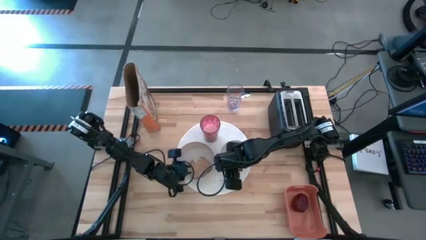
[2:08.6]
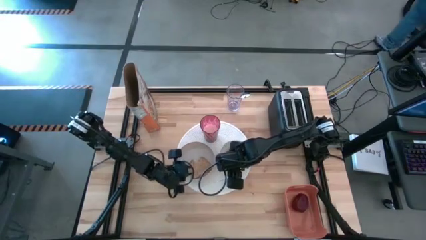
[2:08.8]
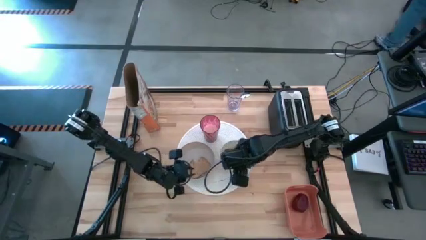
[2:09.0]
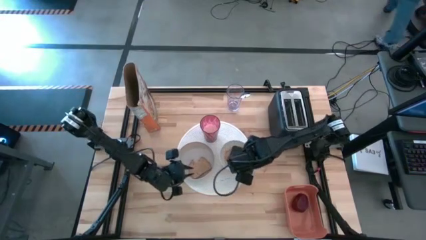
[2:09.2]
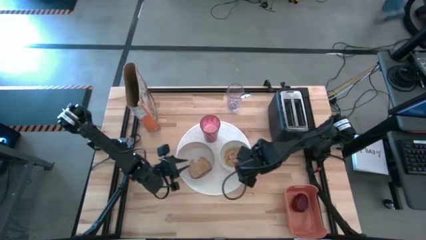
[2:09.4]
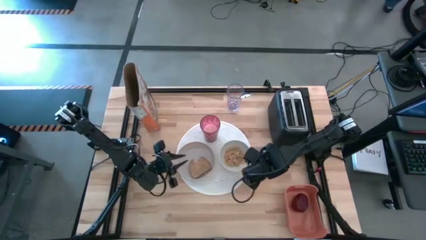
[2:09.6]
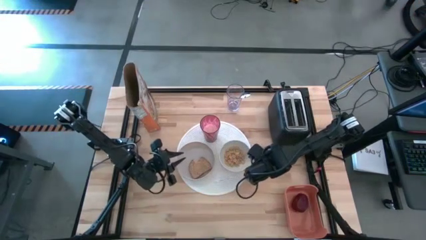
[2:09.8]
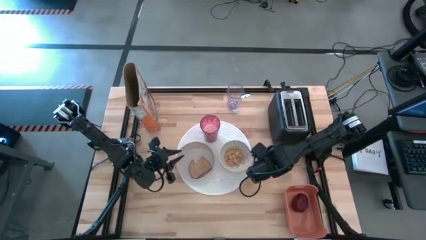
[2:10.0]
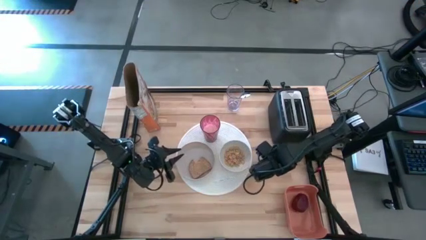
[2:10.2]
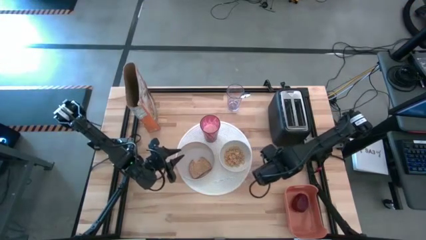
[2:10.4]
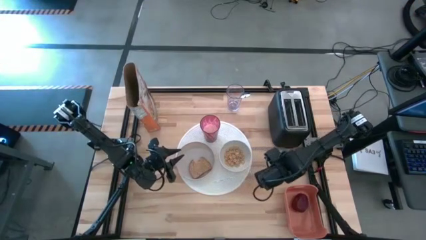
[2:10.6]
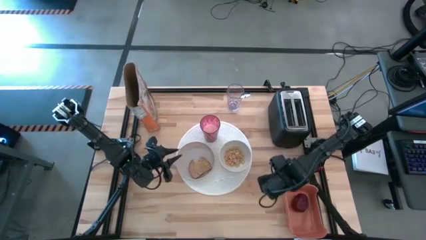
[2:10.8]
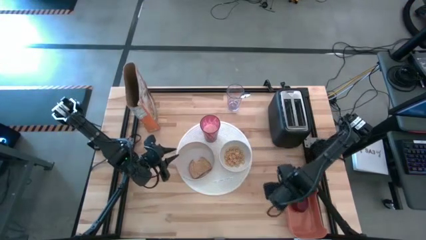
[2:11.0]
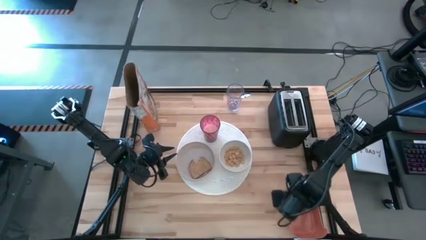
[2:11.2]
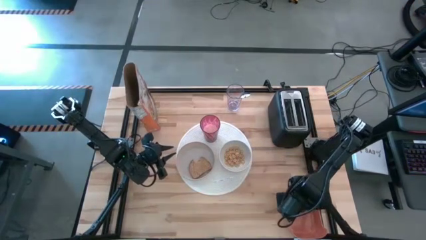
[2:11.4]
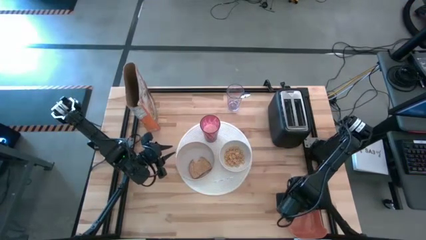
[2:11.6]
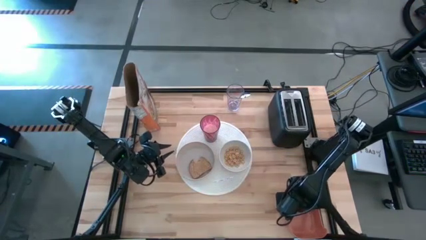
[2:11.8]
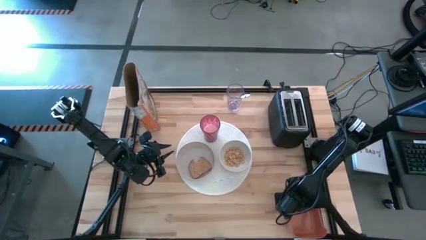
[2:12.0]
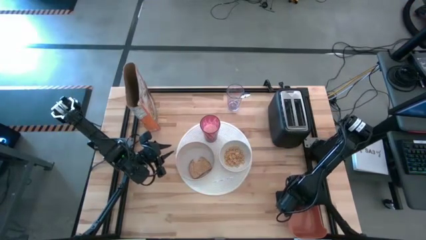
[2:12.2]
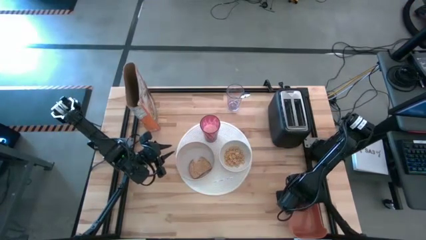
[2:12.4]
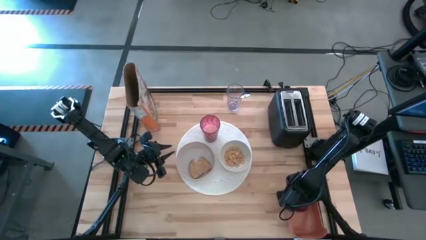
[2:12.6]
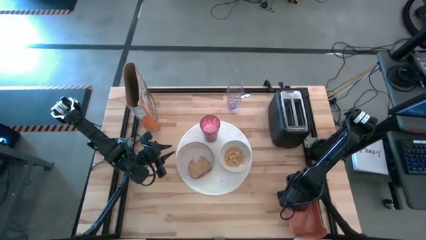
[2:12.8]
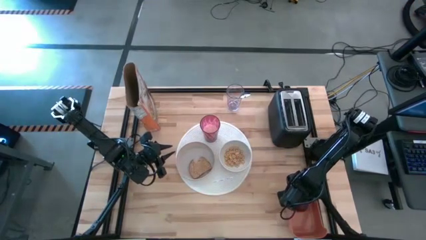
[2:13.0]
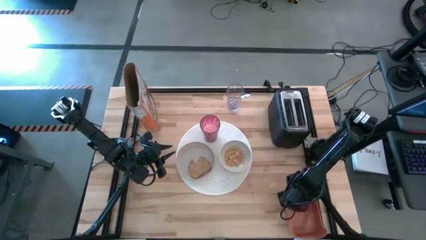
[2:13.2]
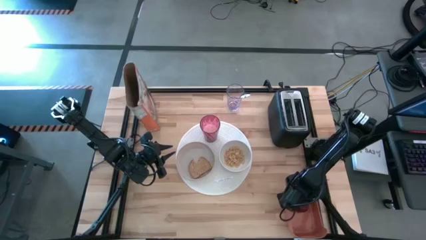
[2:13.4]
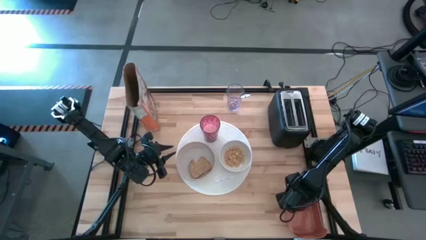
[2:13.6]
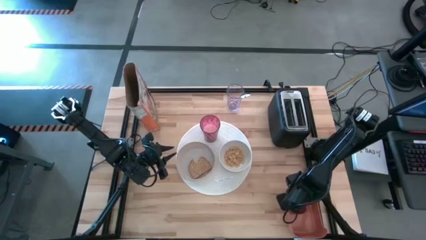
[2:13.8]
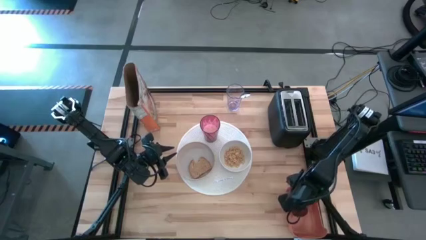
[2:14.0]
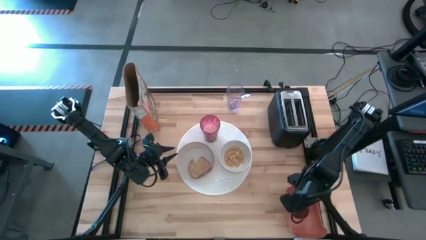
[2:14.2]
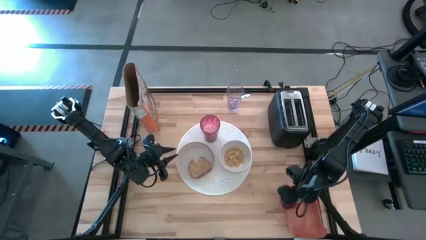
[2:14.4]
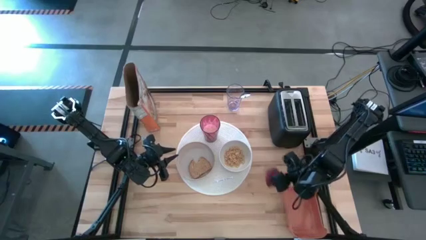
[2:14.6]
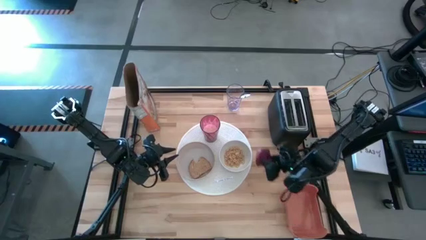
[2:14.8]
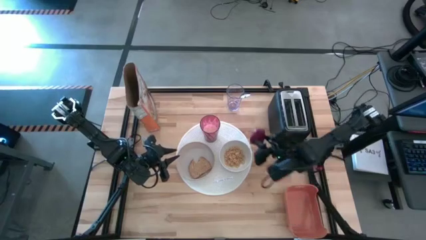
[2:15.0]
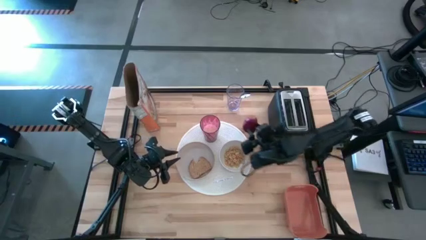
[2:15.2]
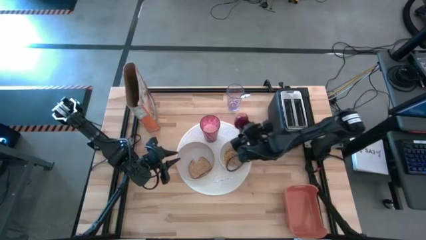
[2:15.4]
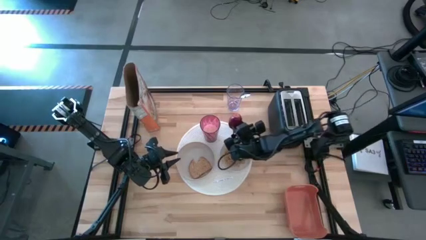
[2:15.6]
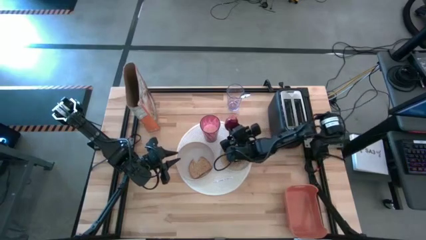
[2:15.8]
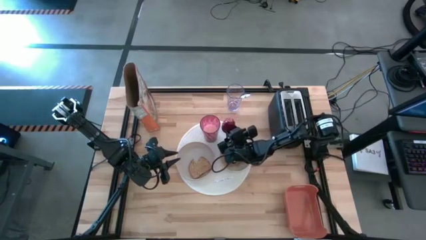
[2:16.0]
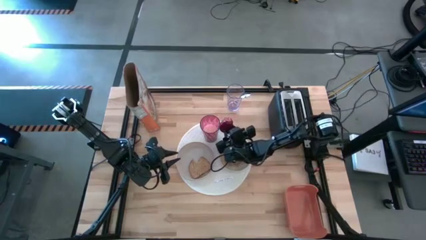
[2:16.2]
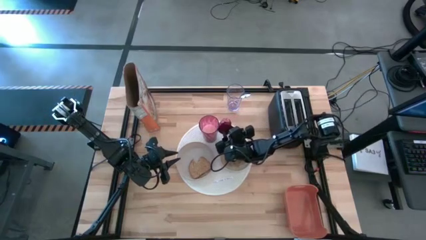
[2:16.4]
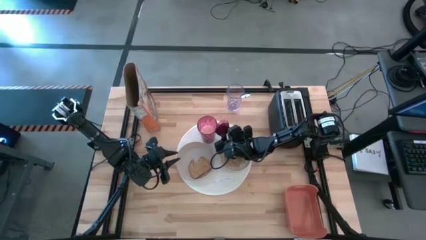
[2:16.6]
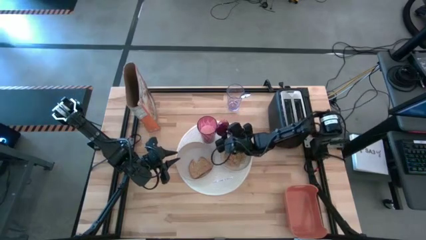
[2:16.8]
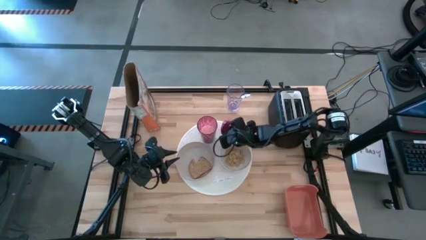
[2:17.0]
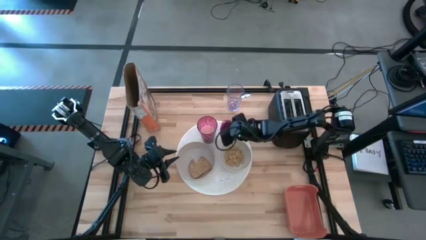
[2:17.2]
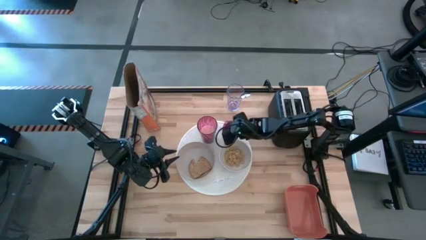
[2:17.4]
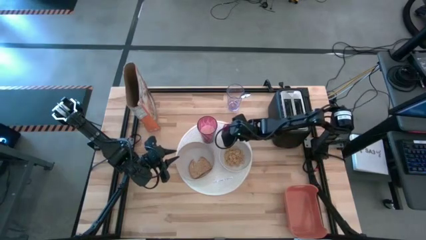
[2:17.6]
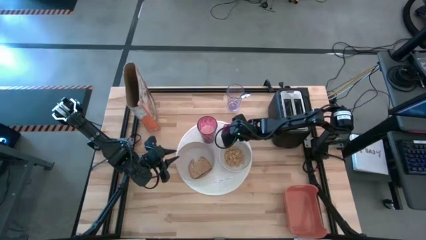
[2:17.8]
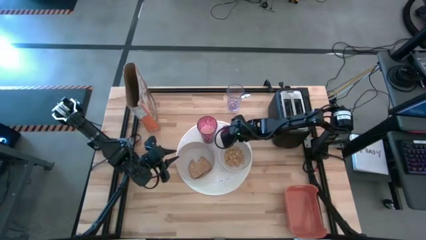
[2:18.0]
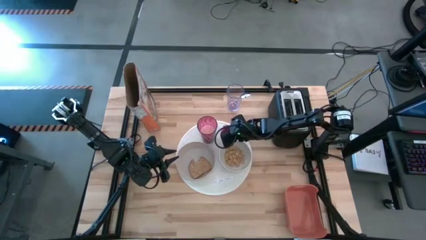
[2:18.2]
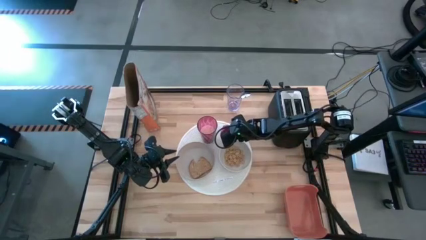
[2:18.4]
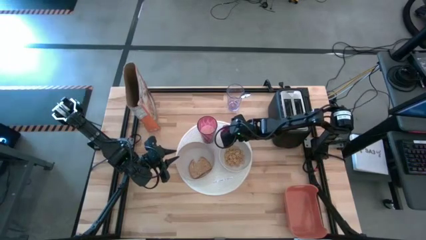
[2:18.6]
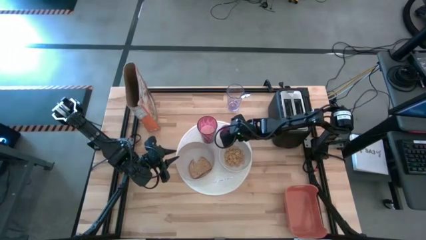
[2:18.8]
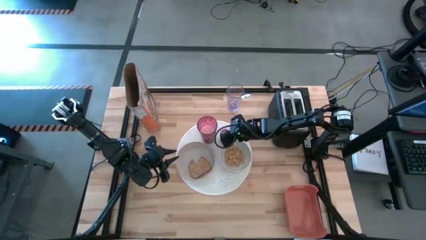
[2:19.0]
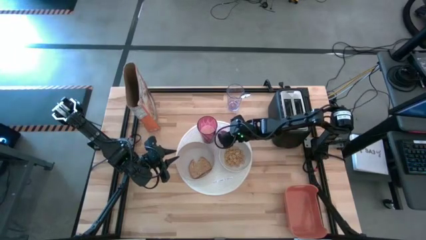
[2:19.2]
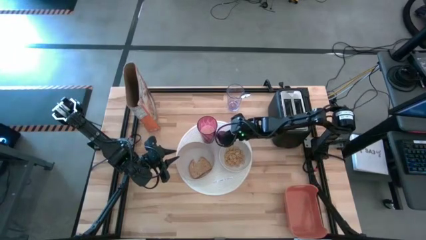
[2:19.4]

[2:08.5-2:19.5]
Task: Arrange a breakfast setting
Put the red apple on the white placemat to the right side of the pink cup

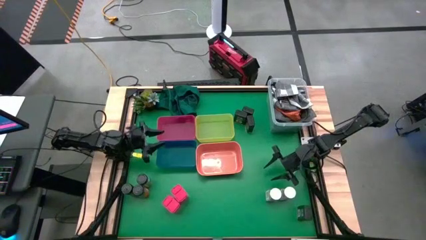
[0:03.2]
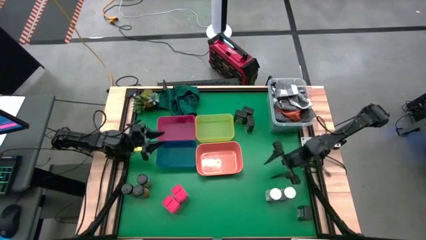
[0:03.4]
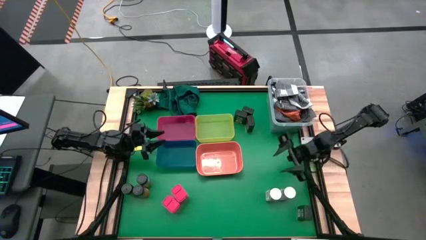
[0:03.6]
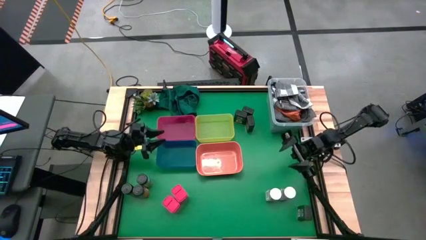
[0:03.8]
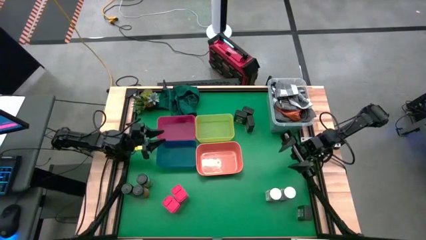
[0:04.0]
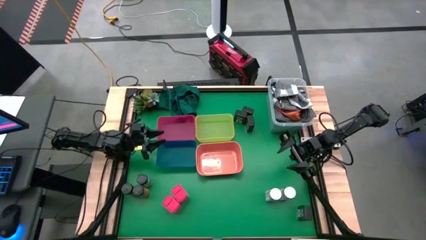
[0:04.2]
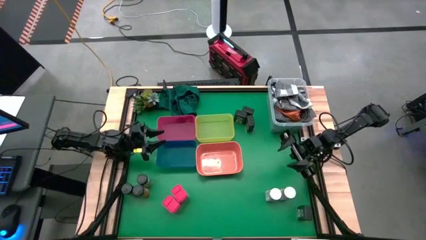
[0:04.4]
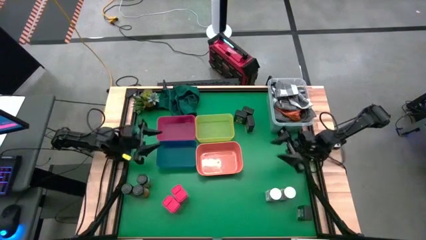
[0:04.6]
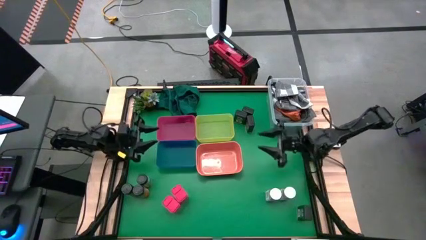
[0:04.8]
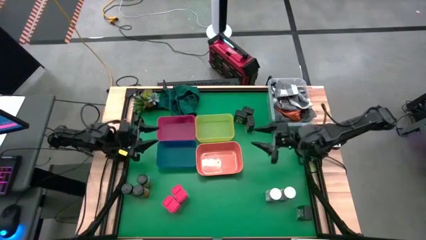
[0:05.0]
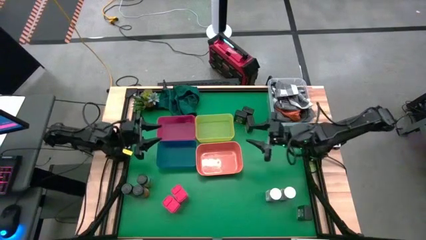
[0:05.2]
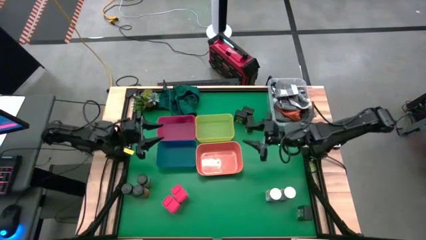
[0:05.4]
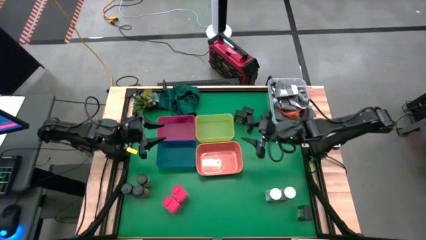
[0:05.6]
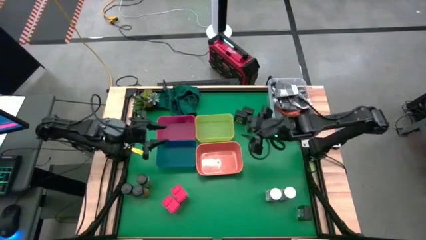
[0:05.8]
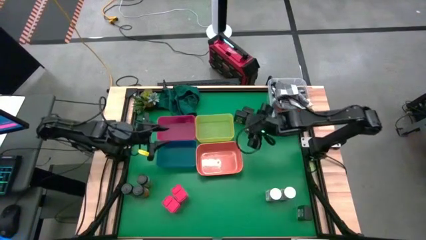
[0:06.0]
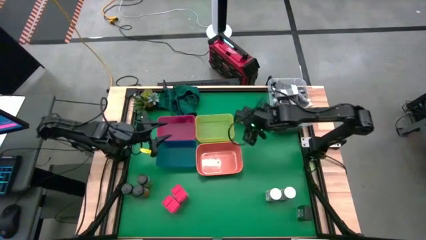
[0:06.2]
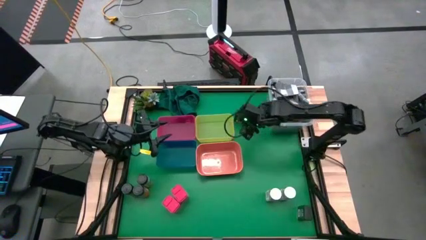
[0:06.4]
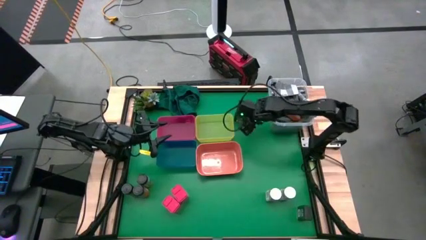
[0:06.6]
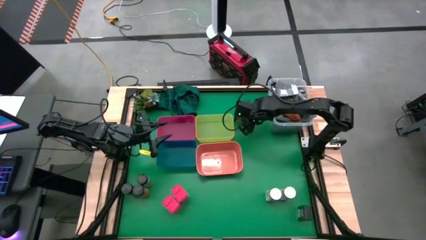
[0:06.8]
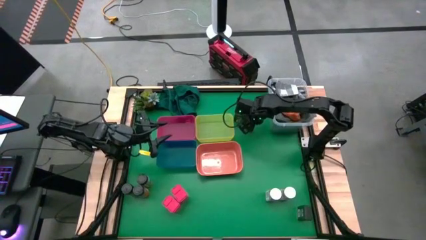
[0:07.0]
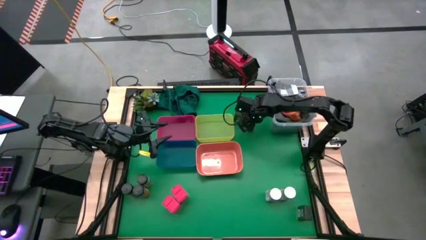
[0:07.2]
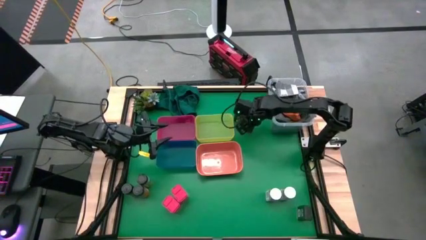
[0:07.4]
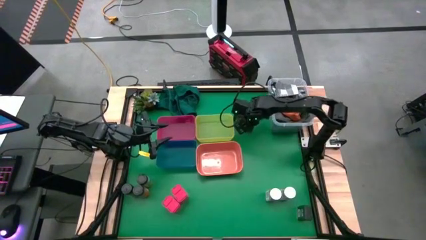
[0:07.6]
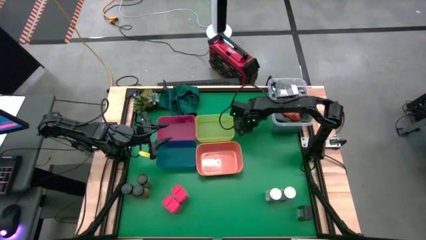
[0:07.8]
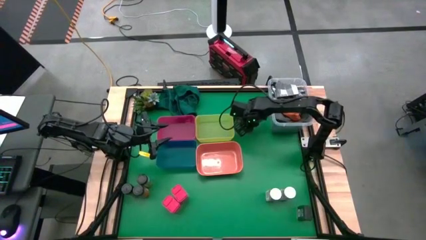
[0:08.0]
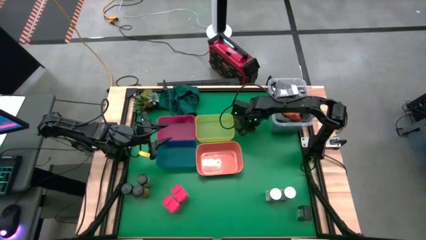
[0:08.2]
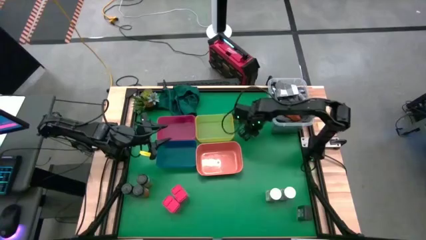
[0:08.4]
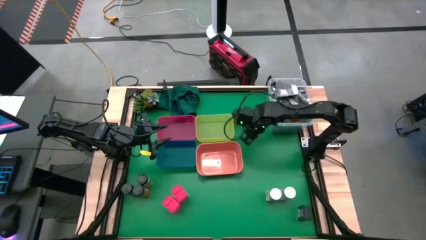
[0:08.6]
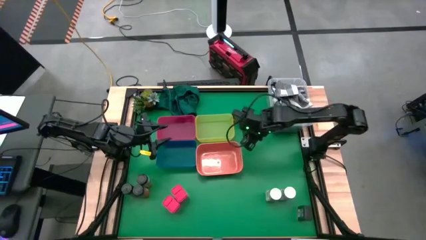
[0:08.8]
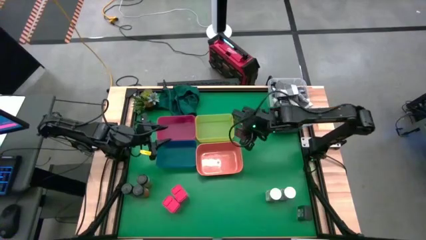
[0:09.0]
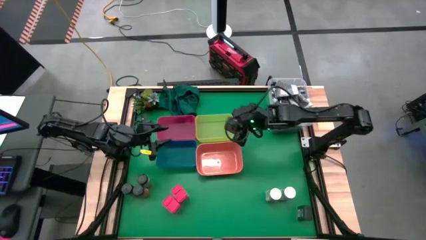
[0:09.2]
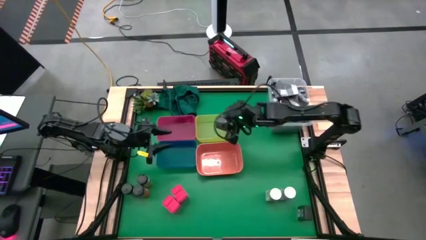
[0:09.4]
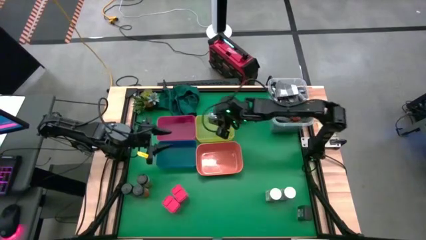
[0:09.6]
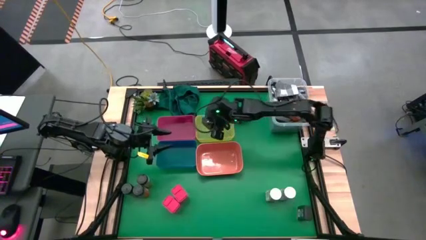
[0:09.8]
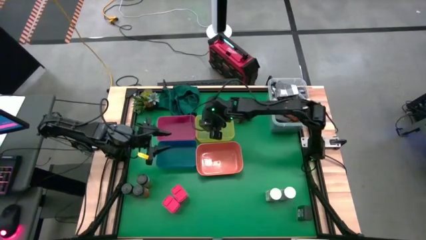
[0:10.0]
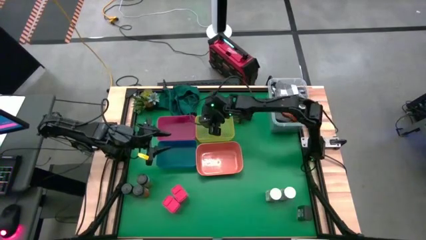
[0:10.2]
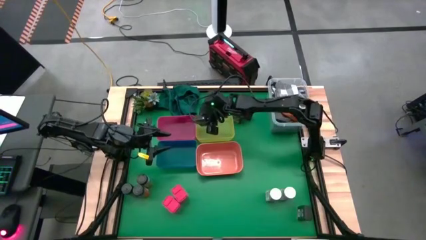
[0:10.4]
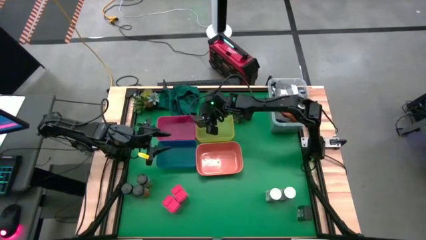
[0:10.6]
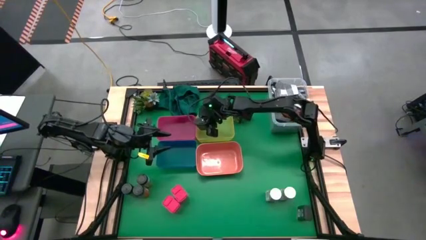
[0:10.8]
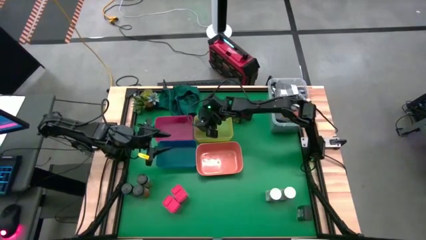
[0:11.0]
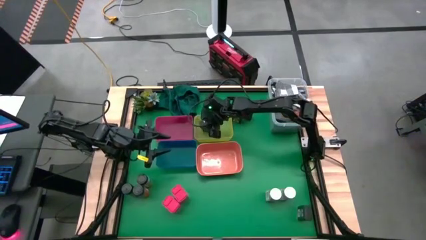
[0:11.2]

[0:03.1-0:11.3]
Task: Sort spices by type
Put the bottom right black seasoning can into the yellow bin
